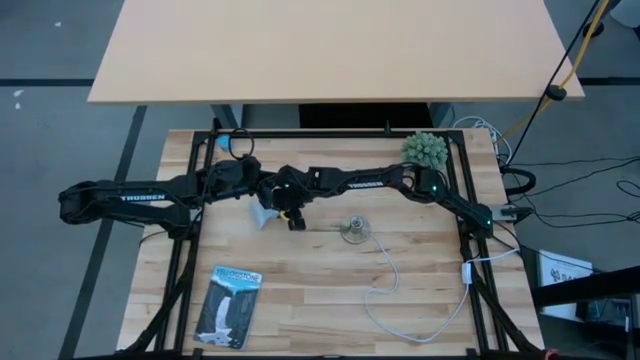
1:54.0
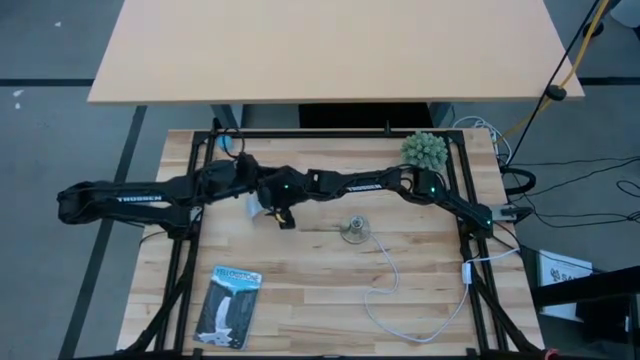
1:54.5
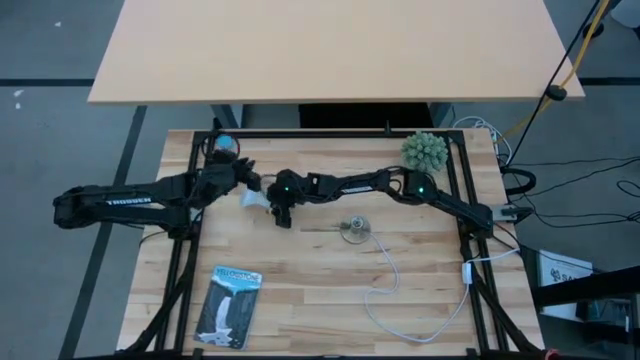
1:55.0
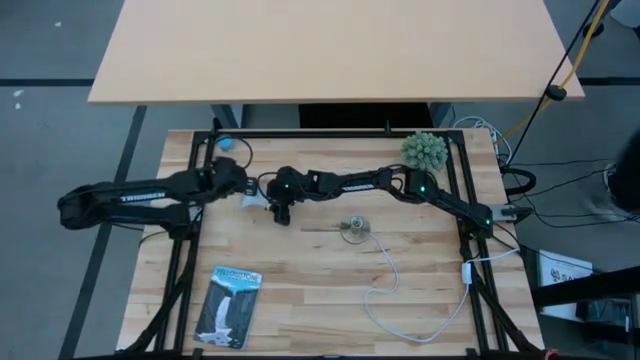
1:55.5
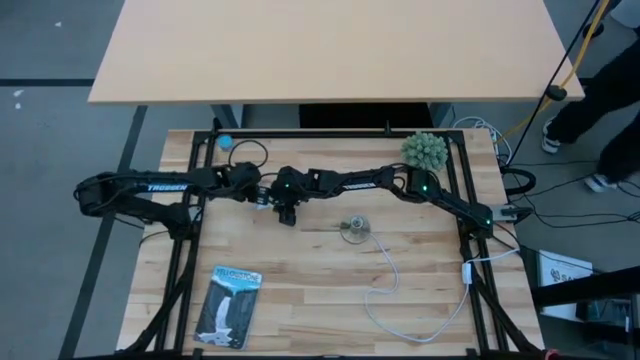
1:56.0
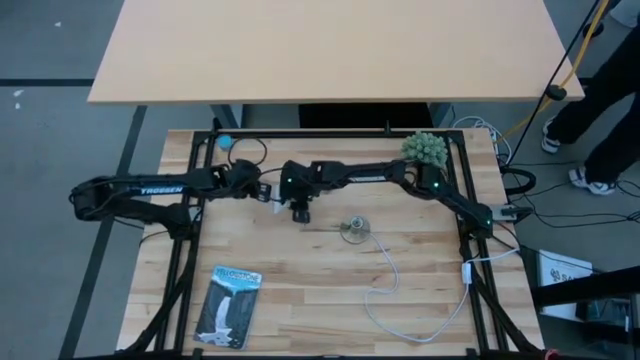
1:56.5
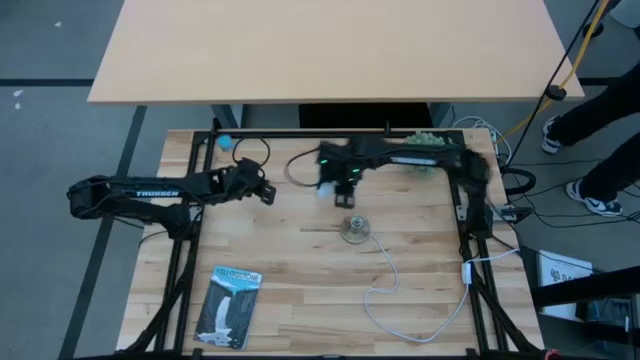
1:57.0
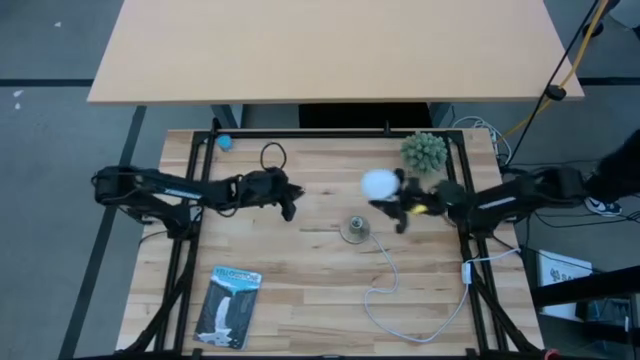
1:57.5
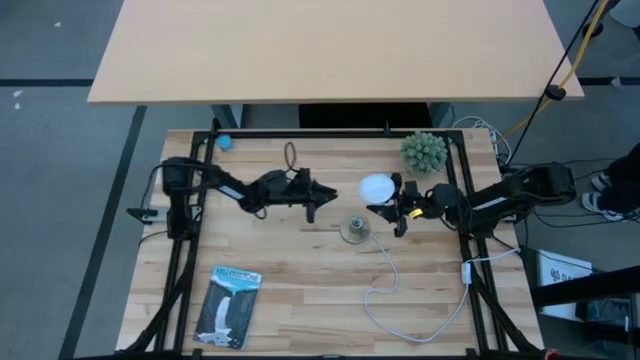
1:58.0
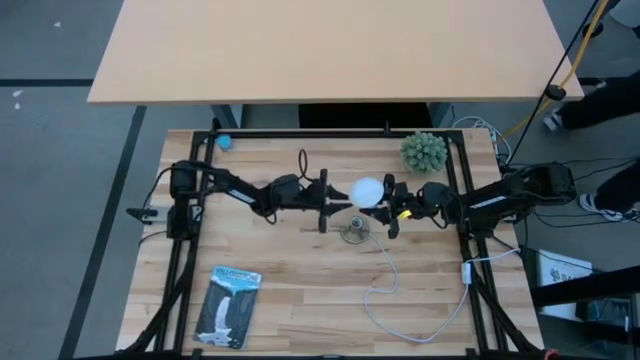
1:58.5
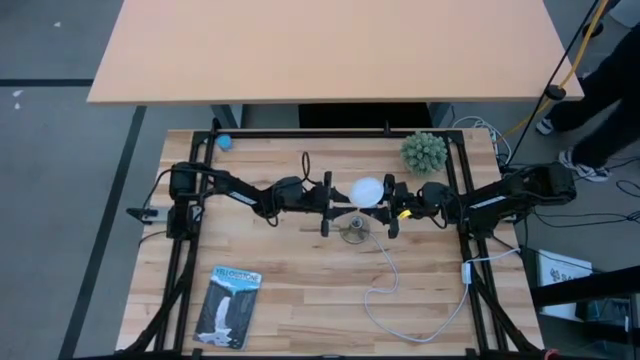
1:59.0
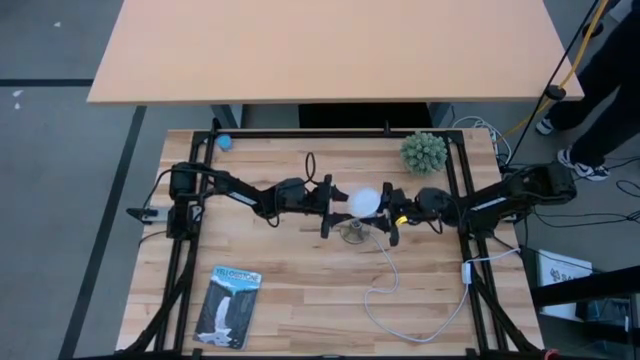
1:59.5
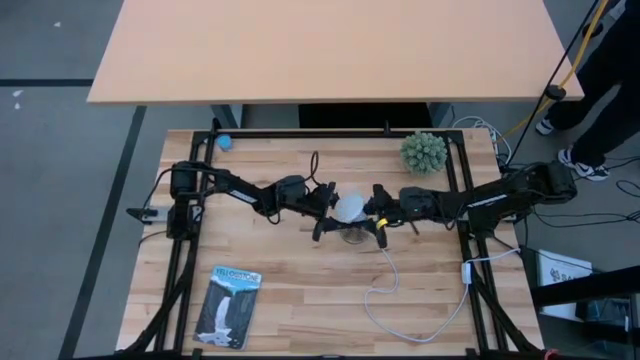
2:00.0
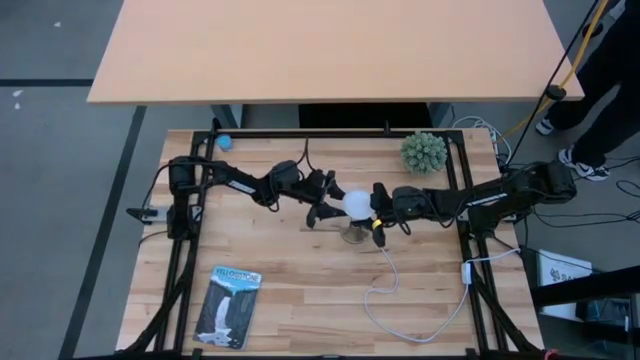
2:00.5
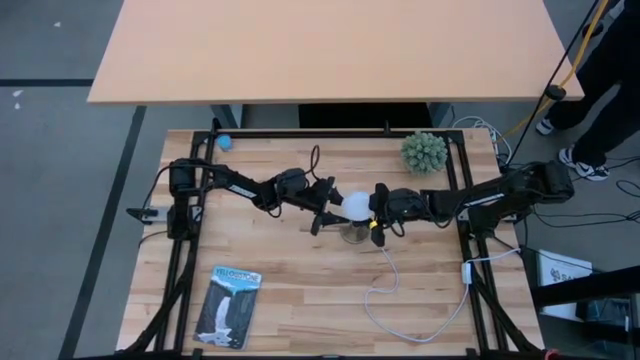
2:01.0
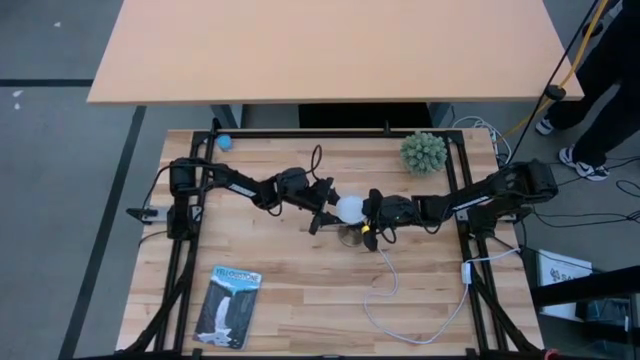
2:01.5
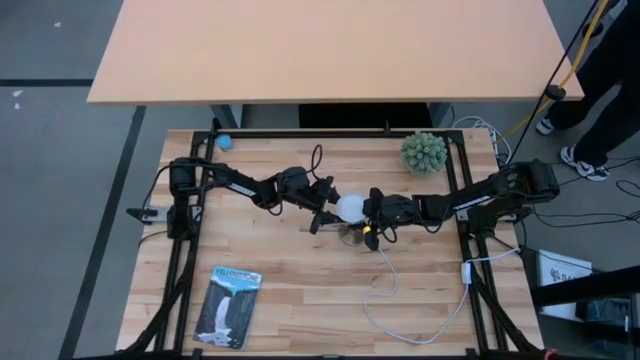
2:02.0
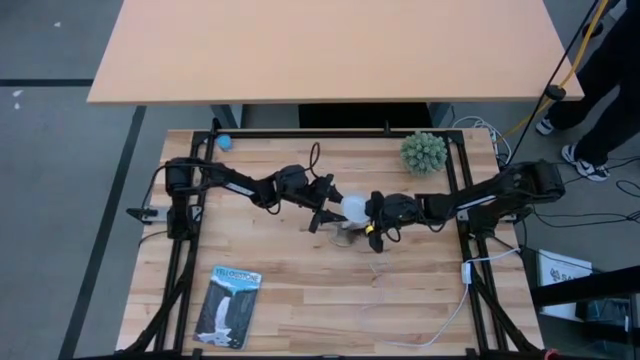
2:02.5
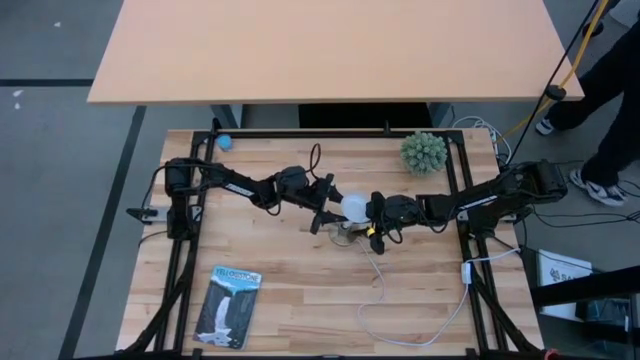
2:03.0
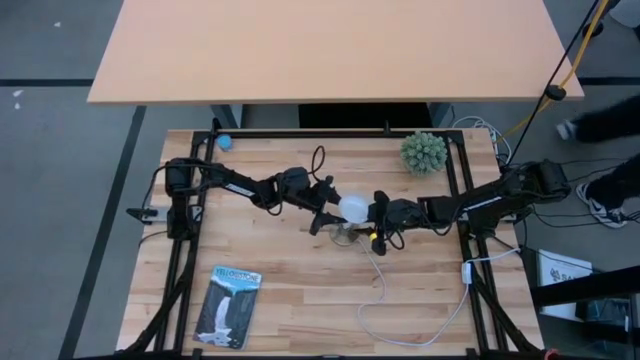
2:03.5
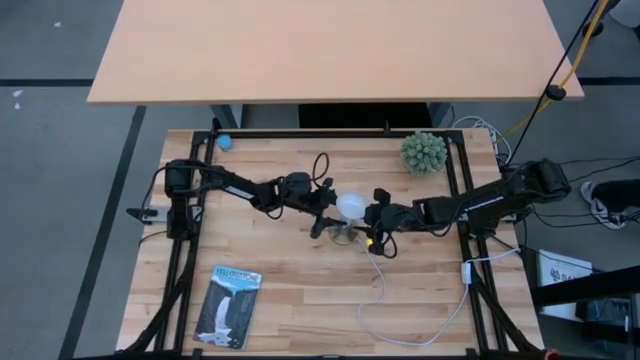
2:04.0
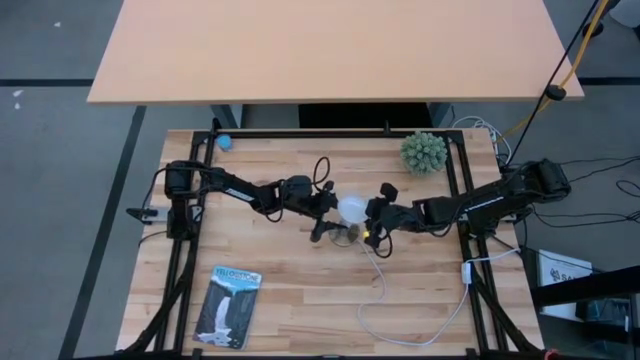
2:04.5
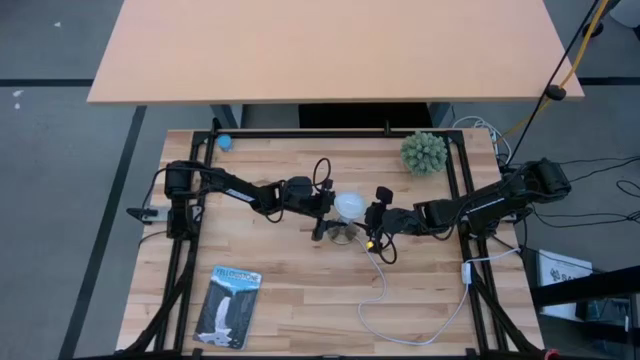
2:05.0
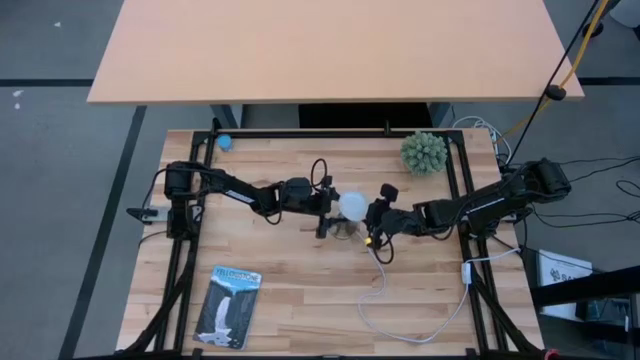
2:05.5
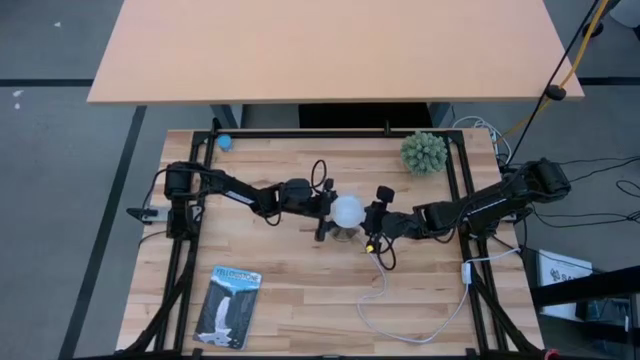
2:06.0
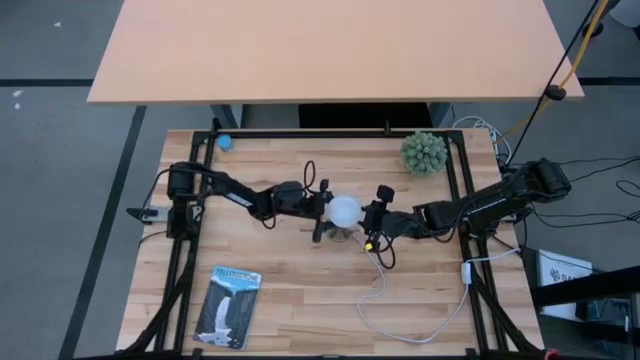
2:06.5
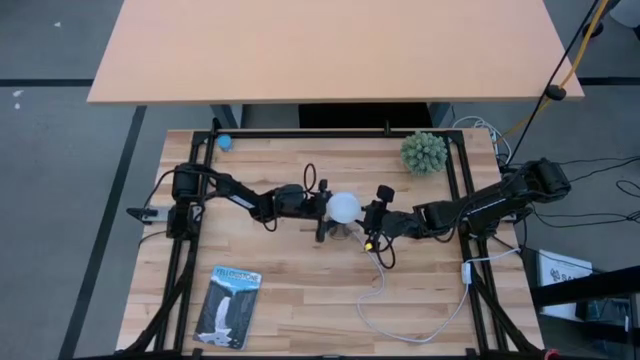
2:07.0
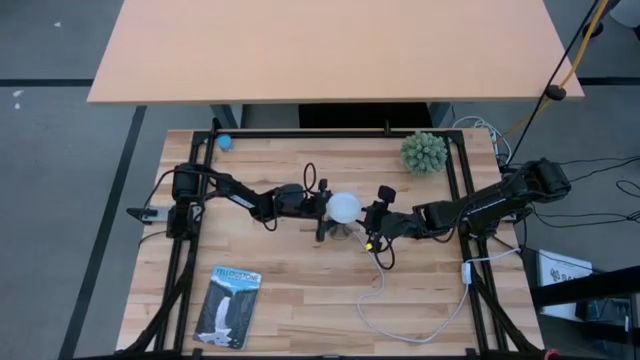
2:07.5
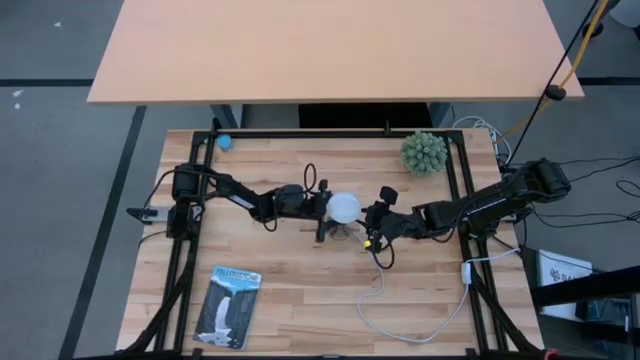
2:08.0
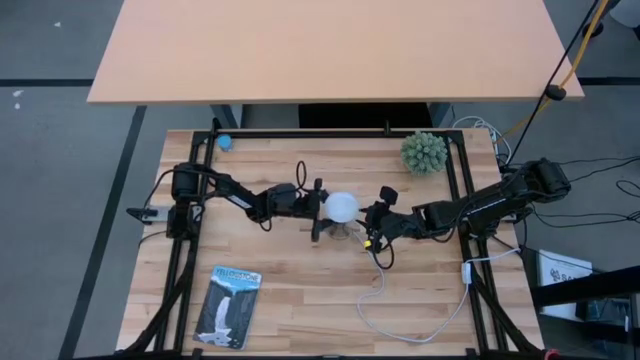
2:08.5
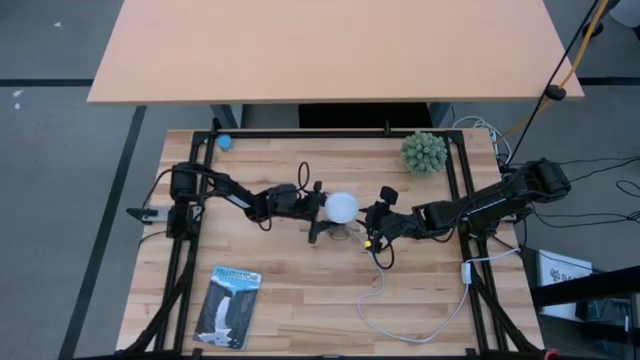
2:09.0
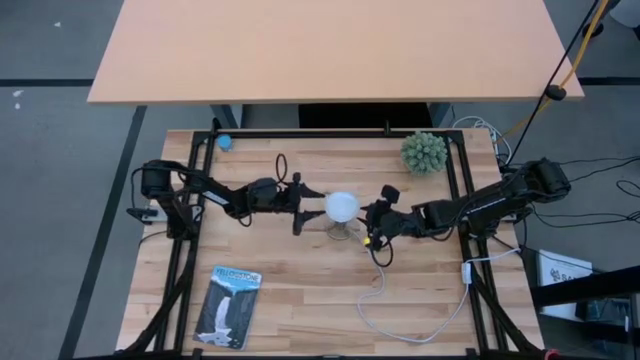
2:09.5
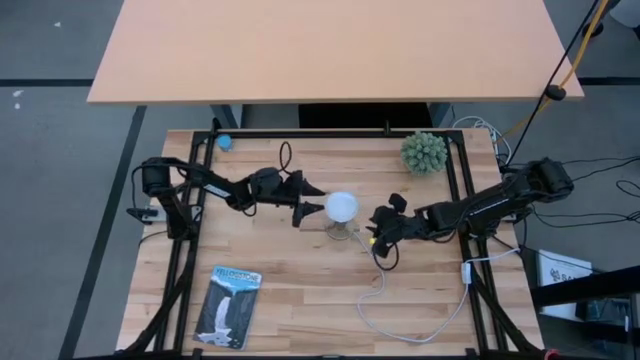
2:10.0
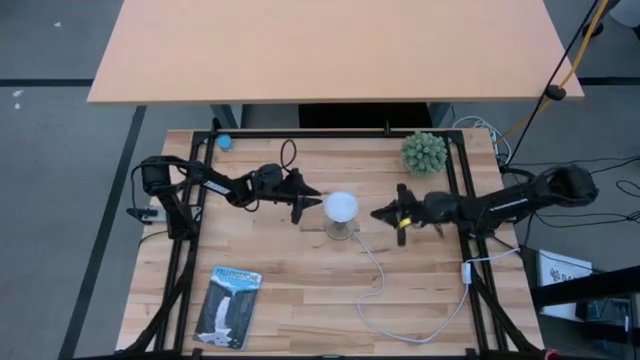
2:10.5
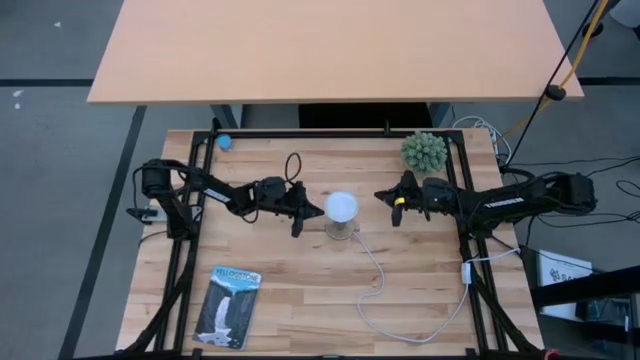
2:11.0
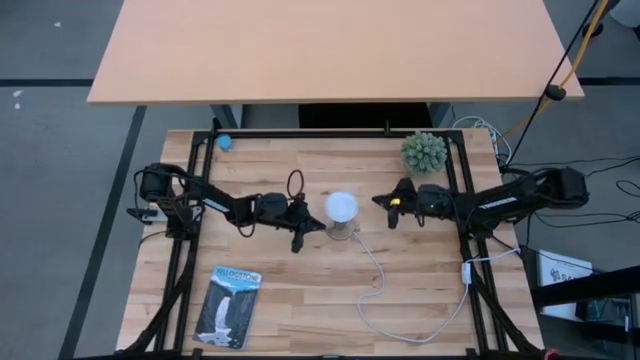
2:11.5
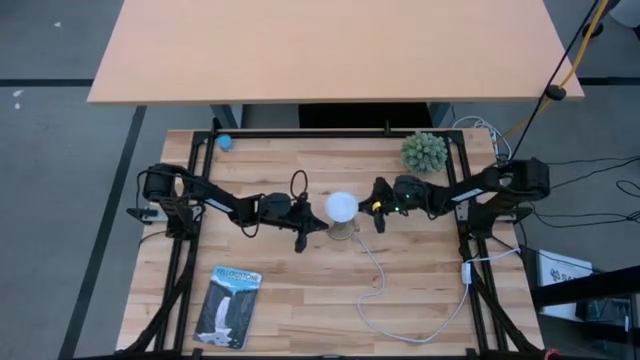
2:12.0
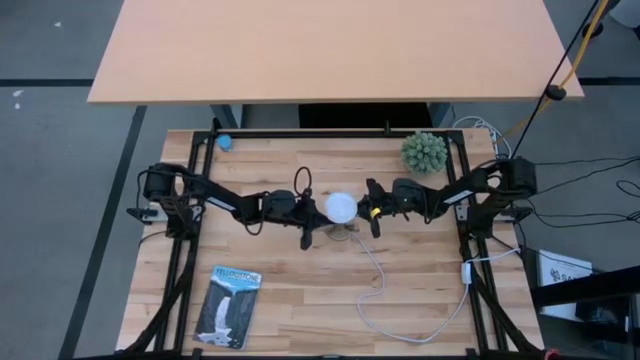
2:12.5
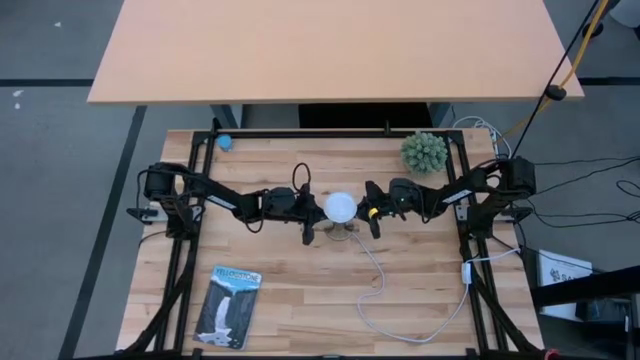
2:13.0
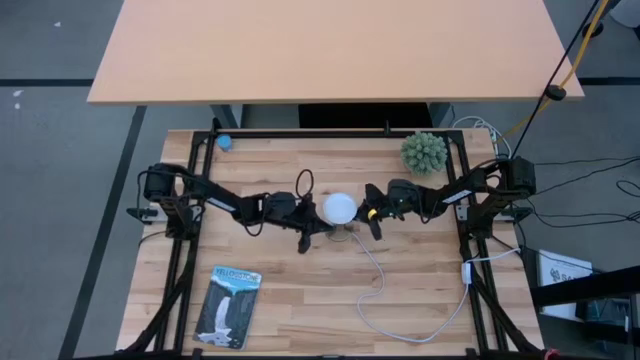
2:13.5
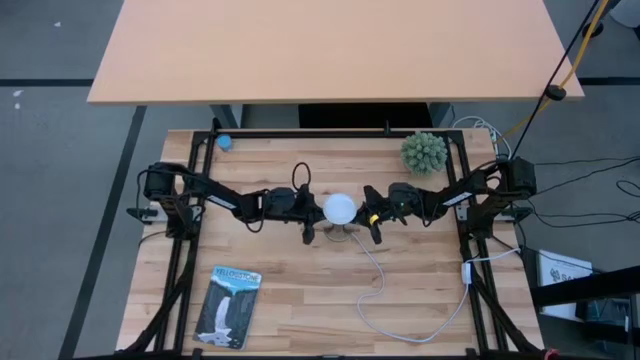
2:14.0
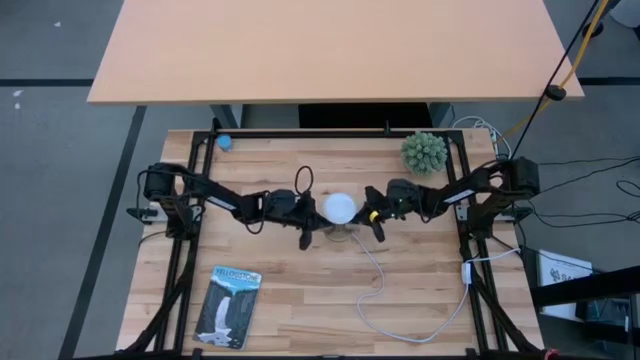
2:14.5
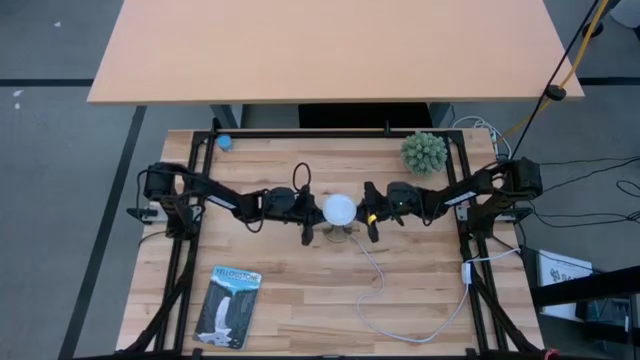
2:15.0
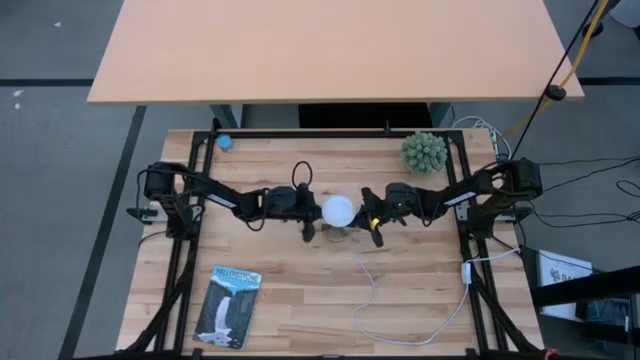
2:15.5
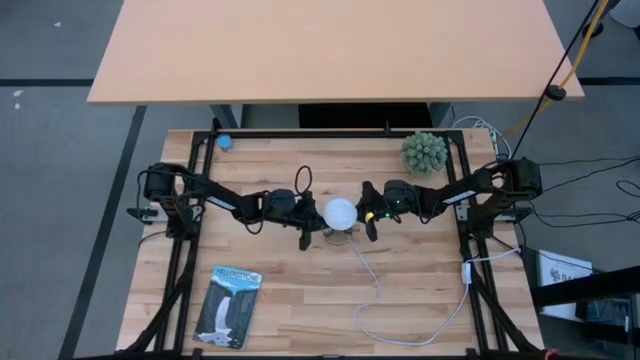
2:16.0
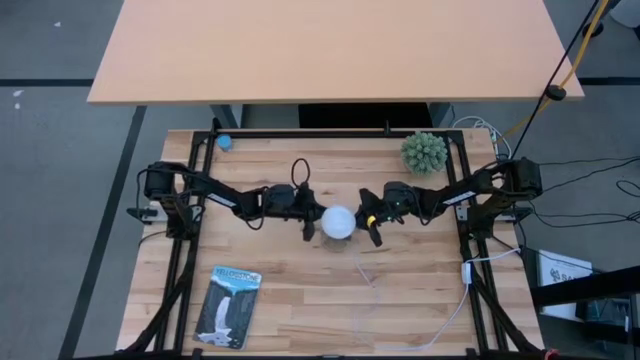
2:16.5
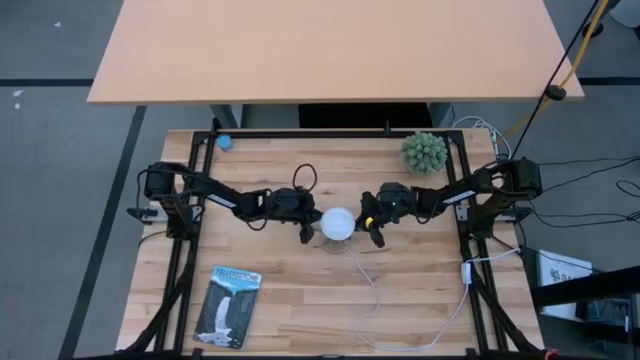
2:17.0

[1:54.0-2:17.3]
Task: Screw lightbulb
Insert the lightbulb into the lamp
